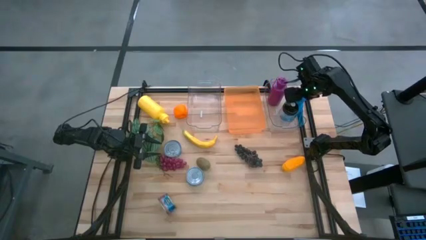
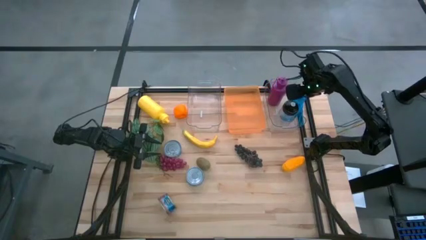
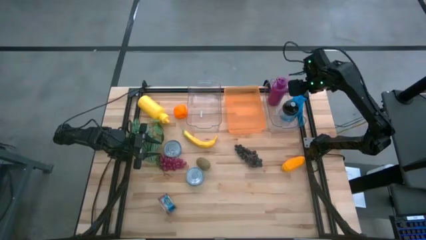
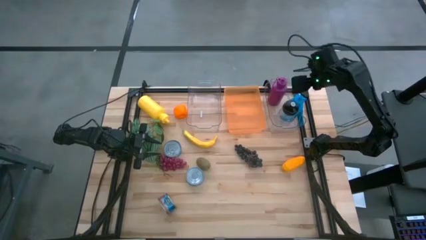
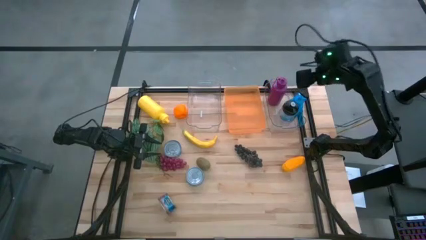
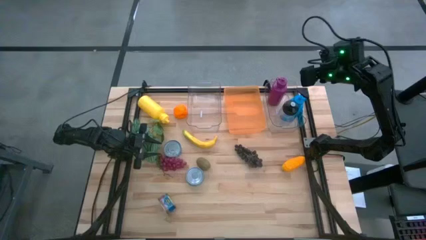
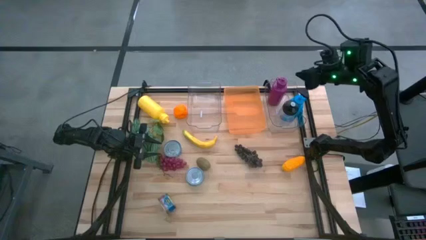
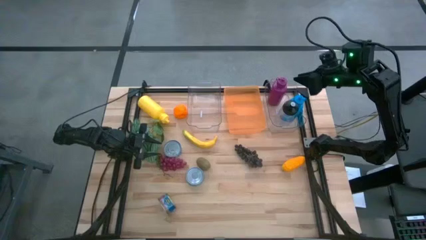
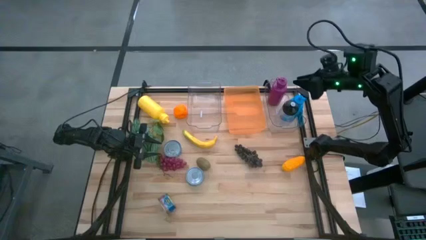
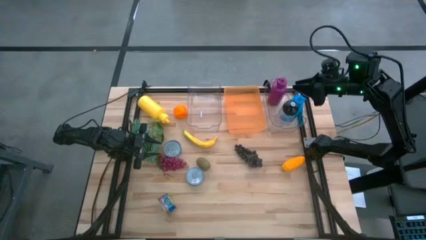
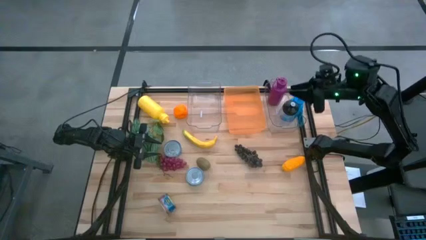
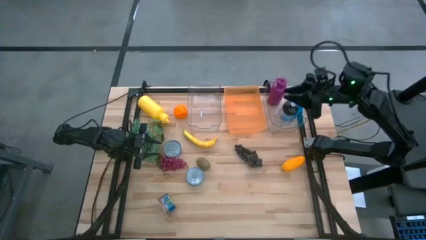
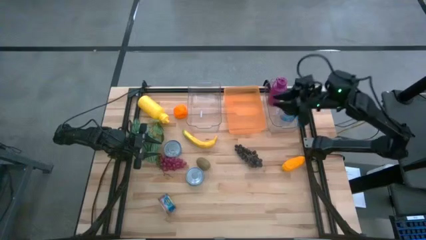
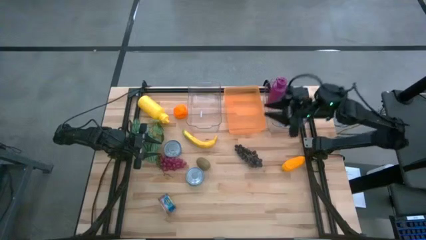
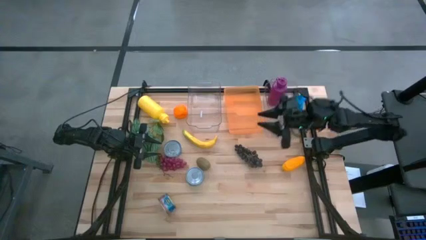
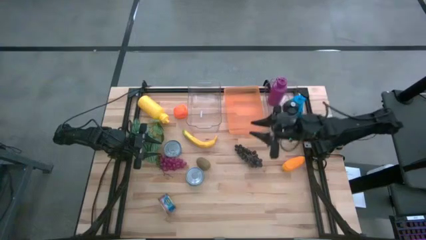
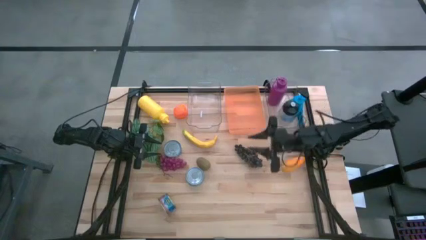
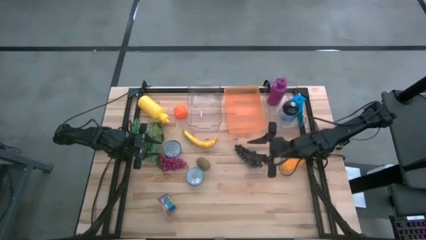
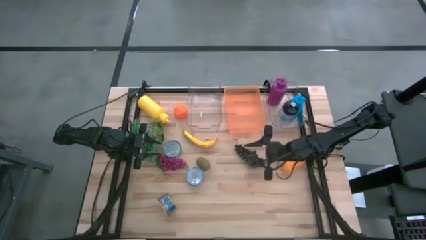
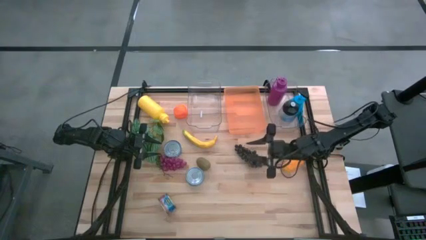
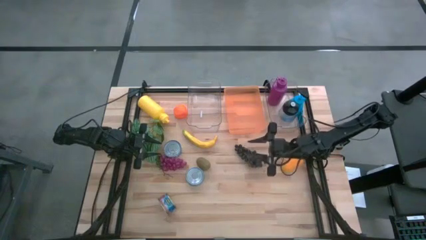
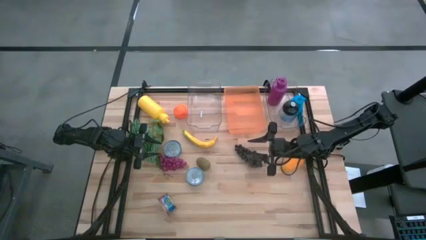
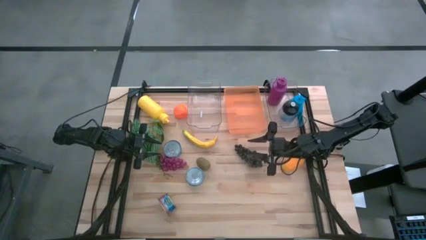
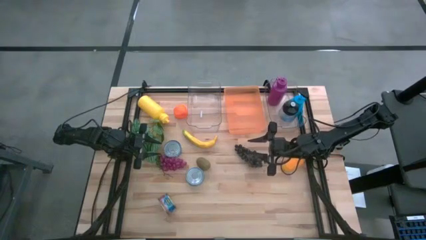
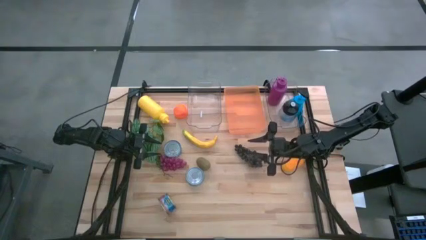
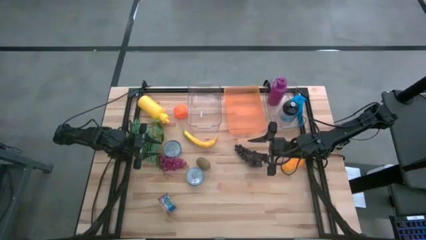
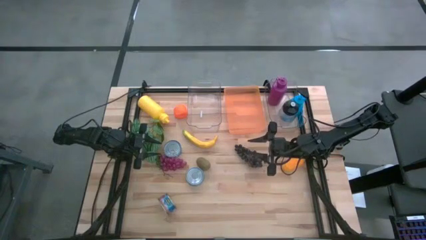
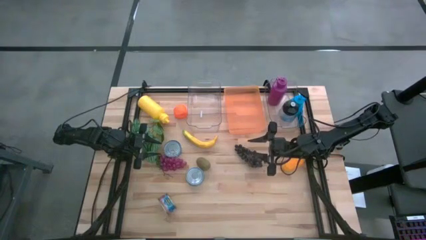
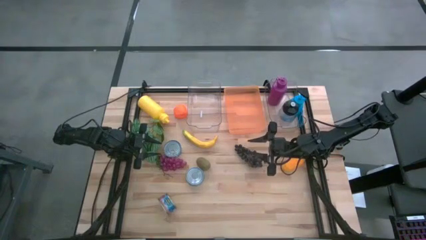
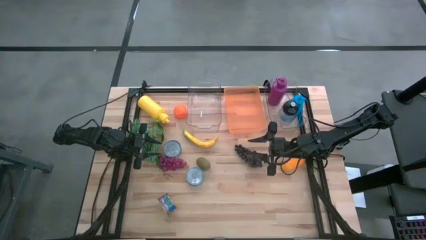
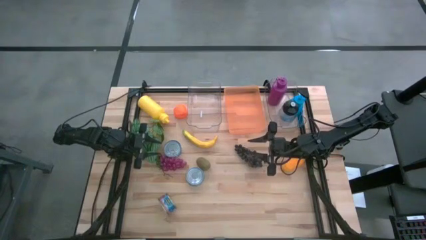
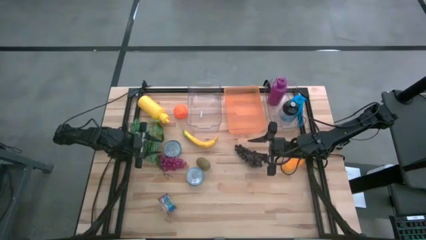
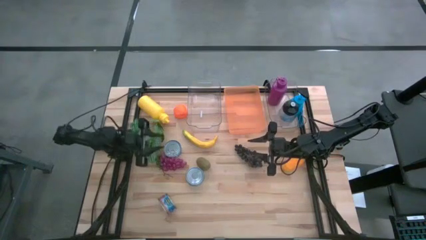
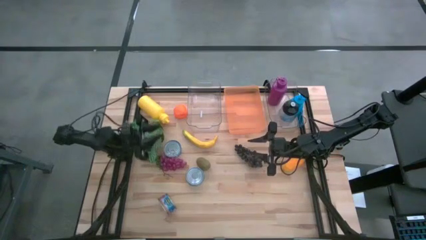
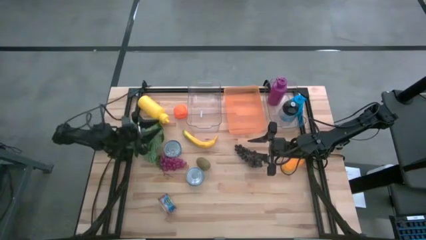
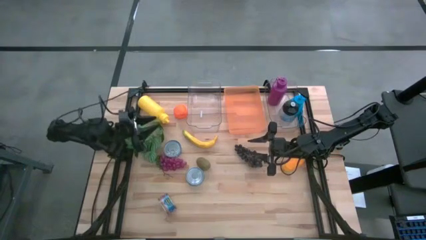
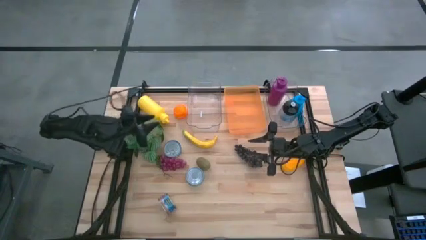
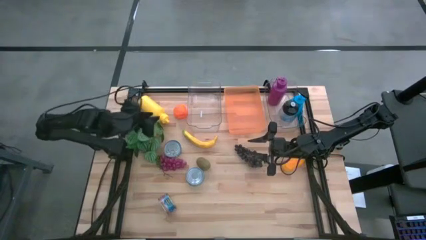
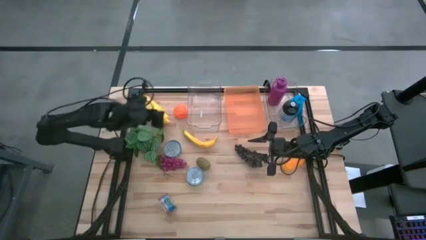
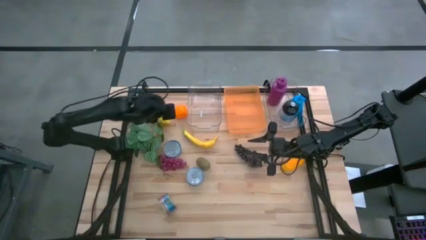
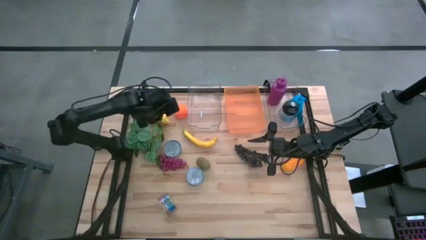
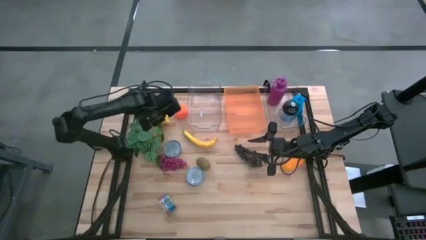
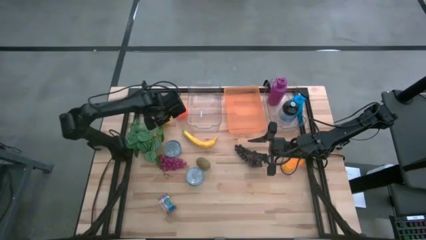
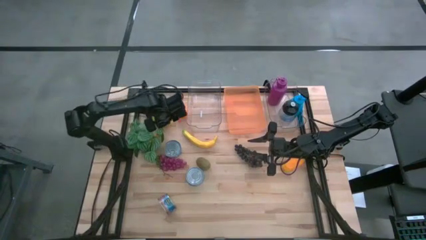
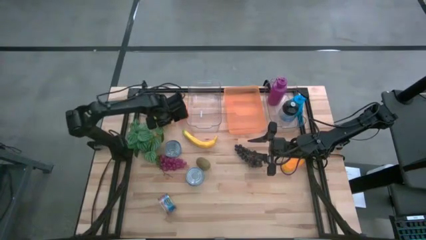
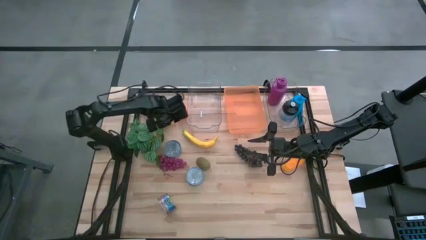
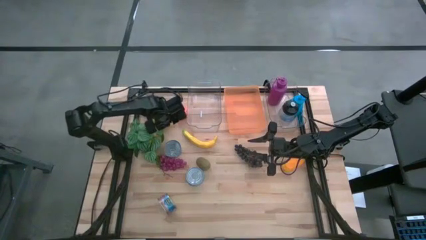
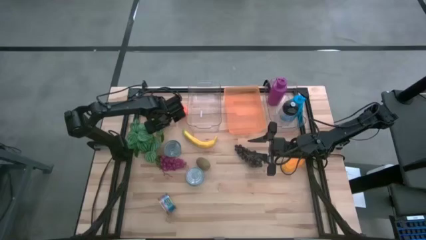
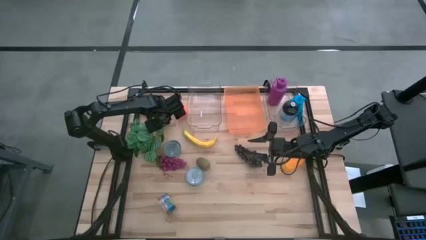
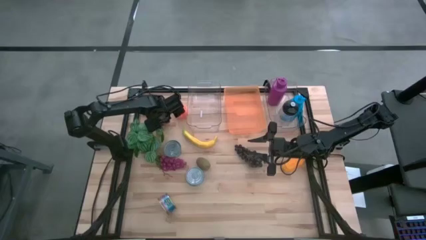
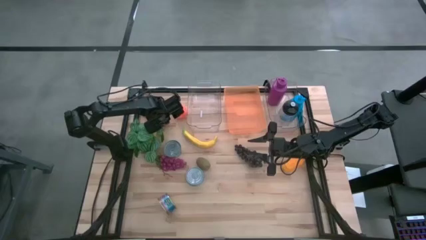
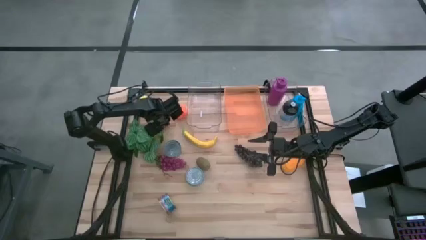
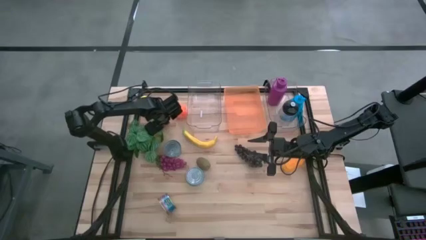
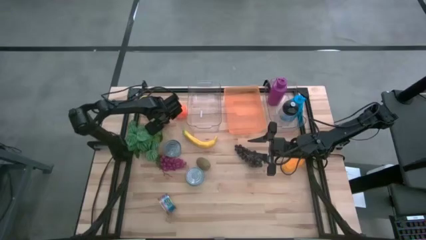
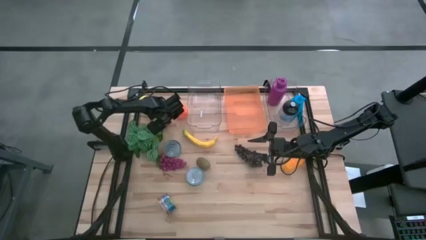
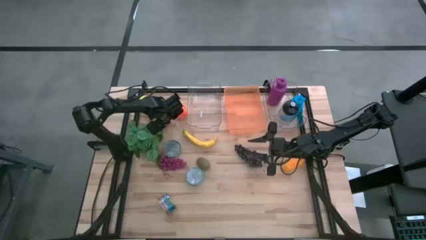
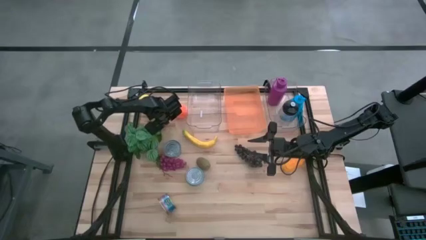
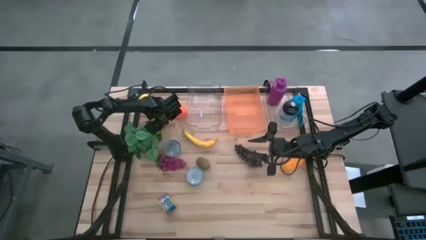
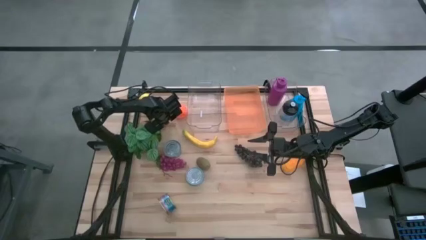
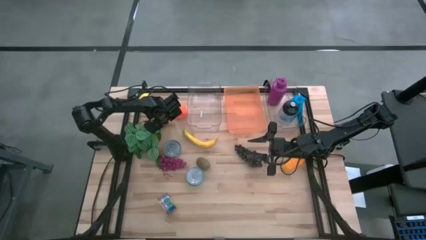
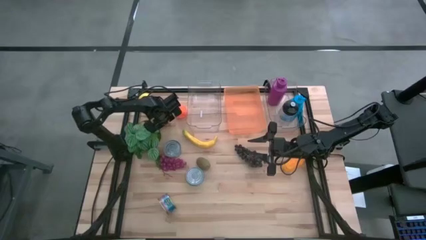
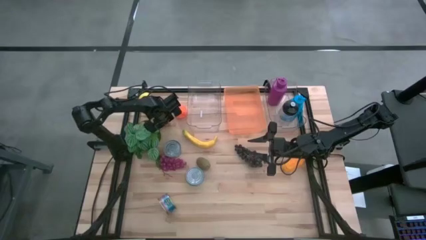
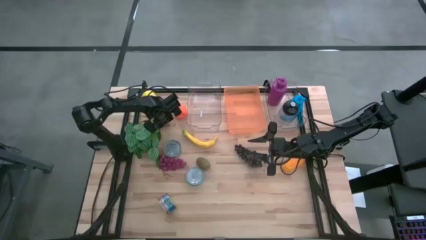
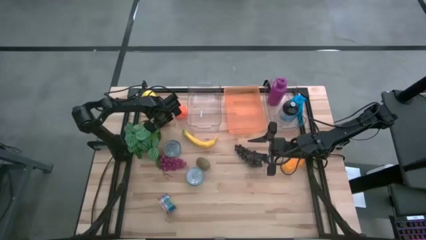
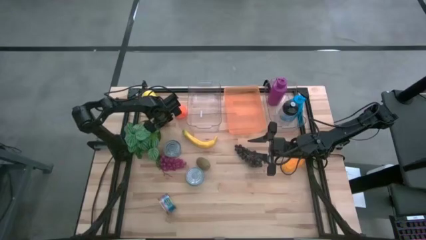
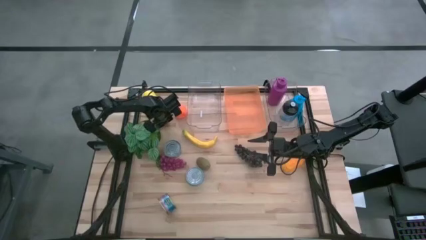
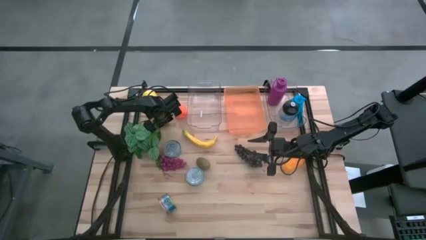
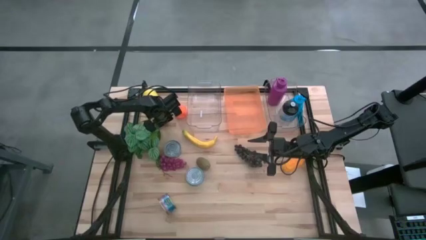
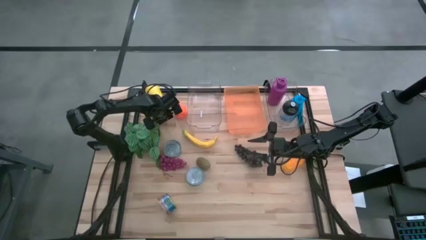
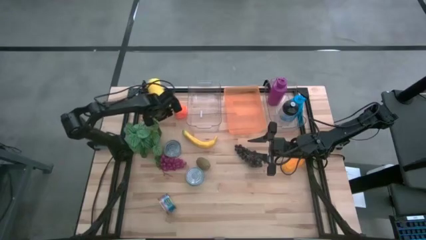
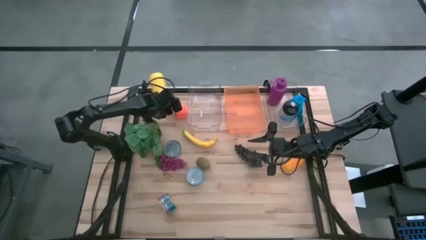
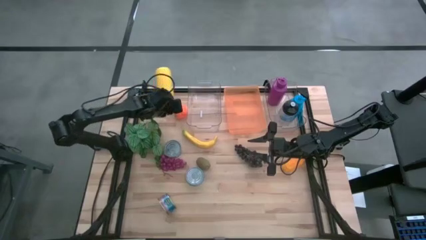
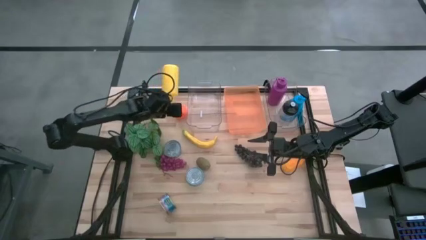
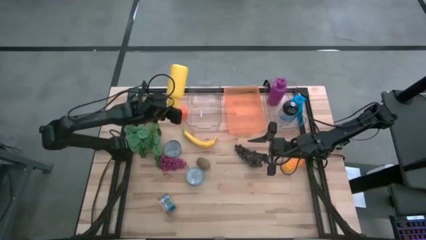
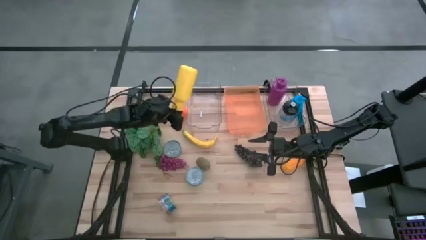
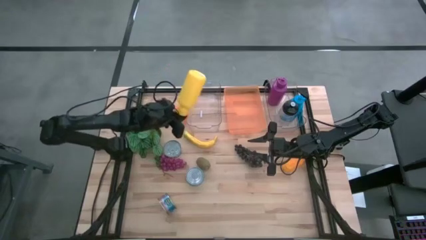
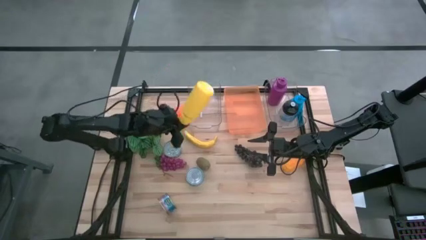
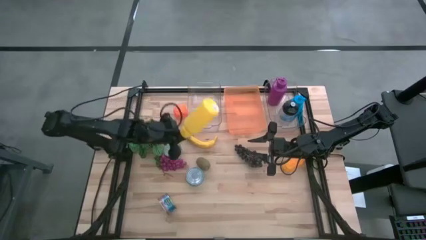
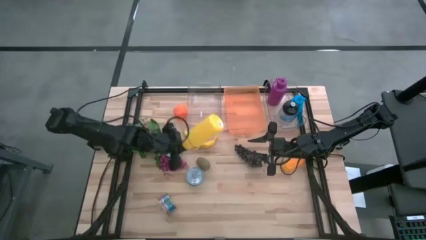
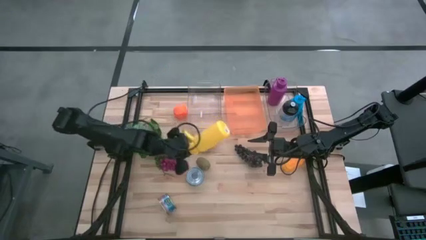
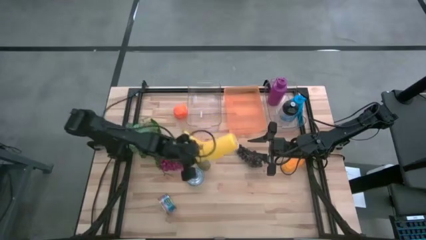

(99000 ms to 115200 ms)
Task: Pick & Place Food Item
Put the yellow water bottle into the right transparent bin
